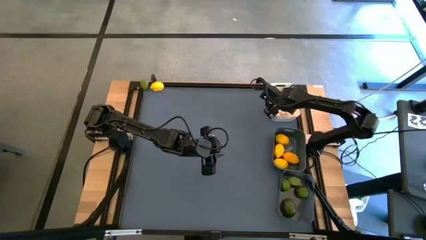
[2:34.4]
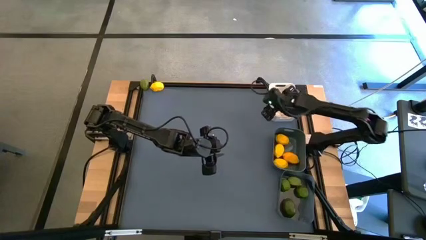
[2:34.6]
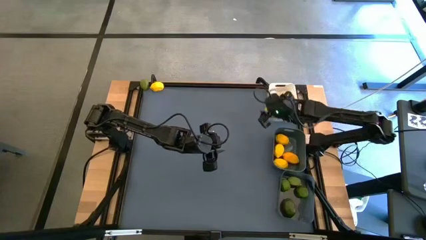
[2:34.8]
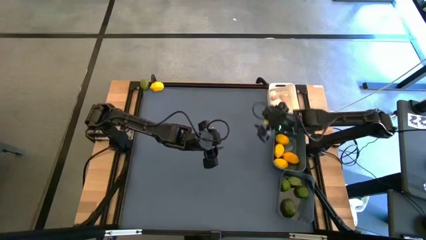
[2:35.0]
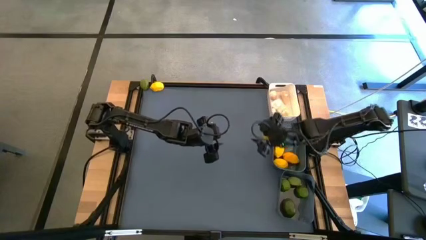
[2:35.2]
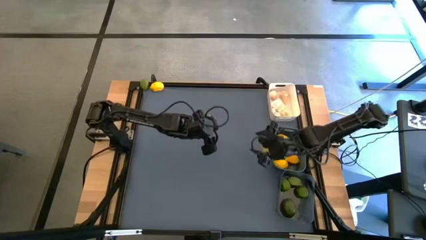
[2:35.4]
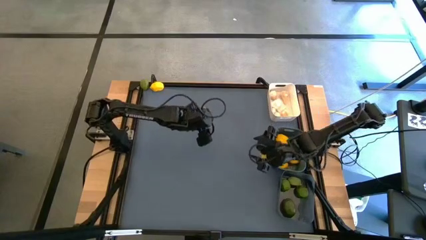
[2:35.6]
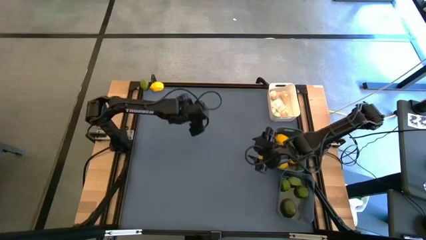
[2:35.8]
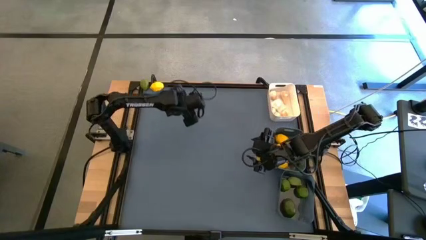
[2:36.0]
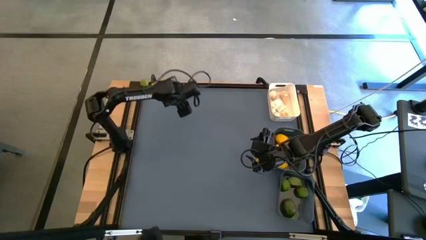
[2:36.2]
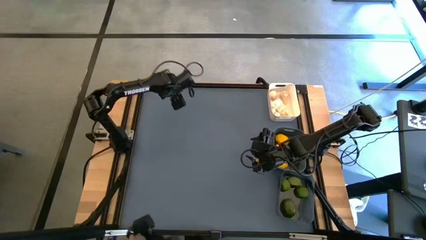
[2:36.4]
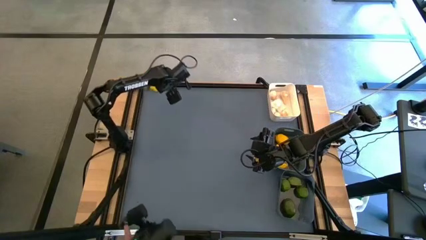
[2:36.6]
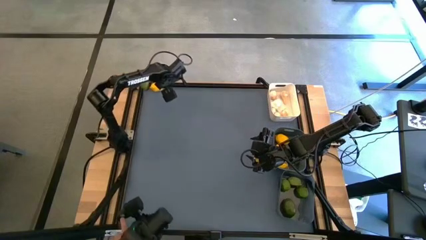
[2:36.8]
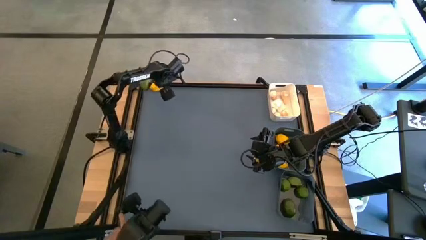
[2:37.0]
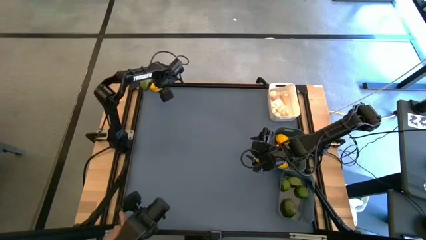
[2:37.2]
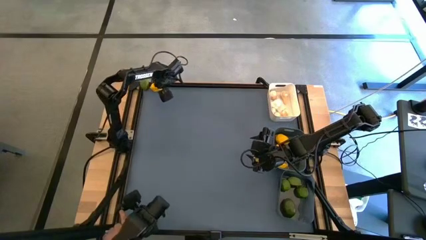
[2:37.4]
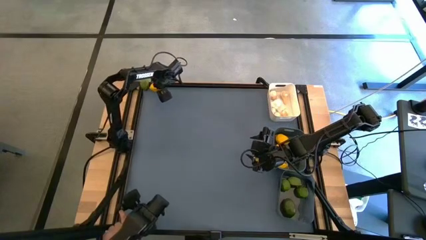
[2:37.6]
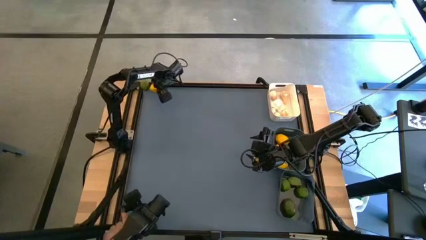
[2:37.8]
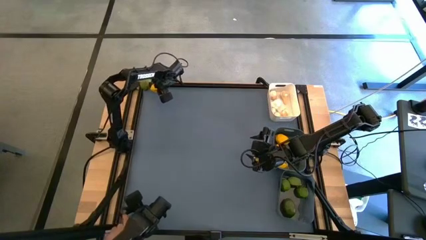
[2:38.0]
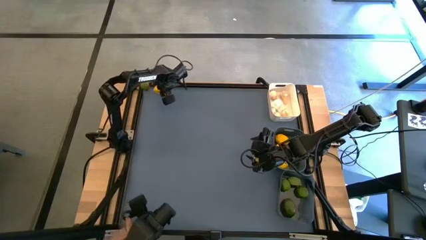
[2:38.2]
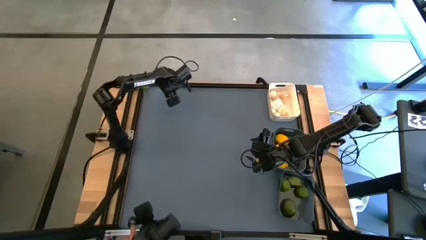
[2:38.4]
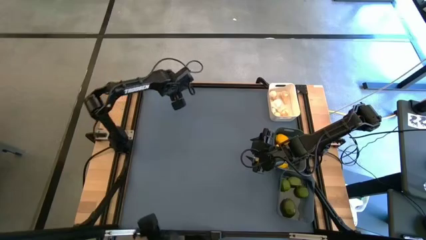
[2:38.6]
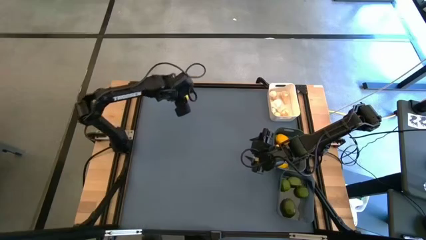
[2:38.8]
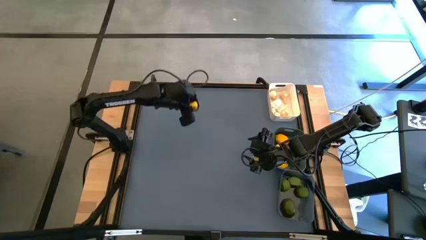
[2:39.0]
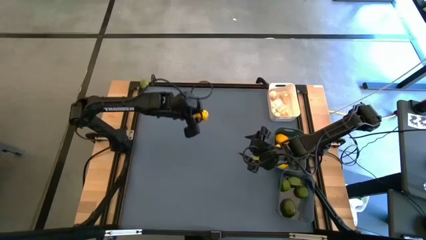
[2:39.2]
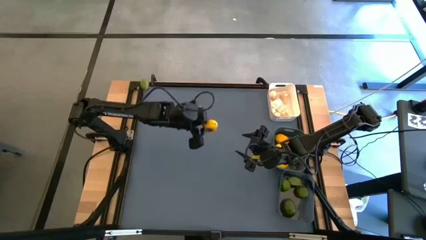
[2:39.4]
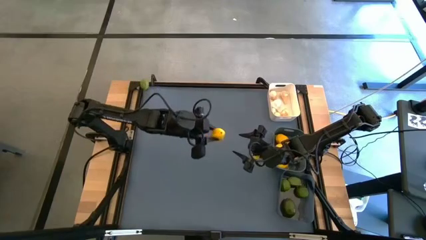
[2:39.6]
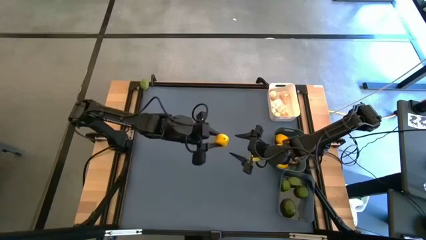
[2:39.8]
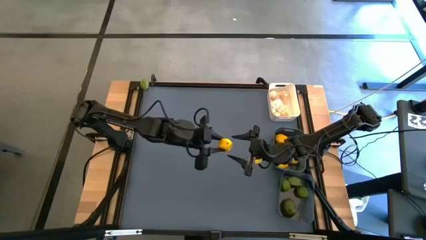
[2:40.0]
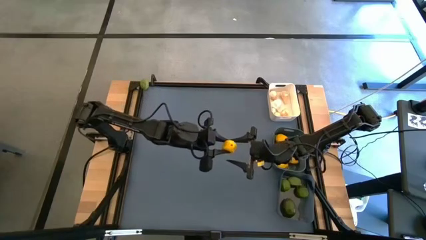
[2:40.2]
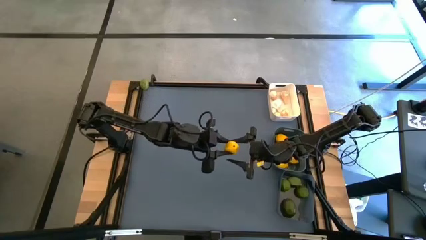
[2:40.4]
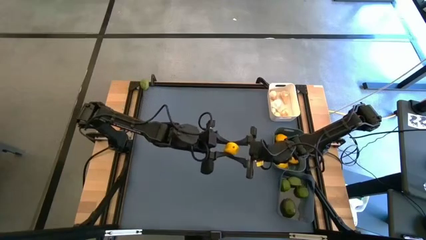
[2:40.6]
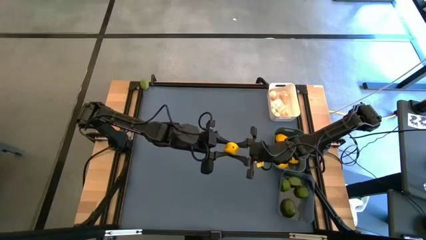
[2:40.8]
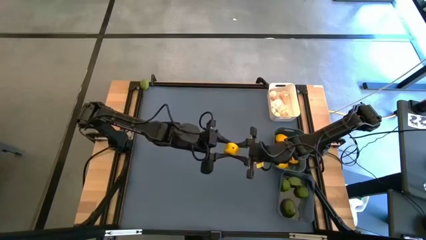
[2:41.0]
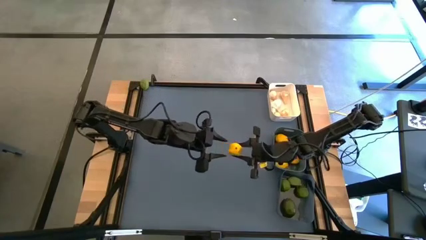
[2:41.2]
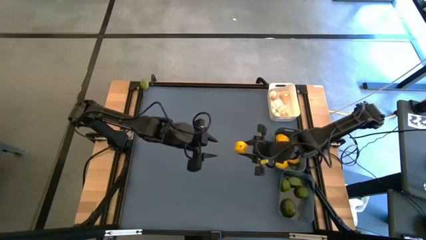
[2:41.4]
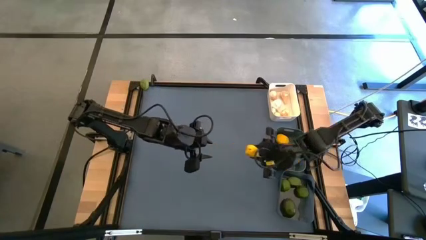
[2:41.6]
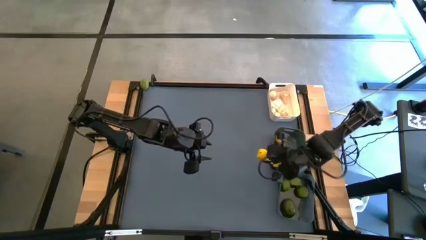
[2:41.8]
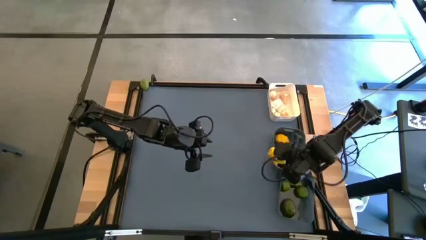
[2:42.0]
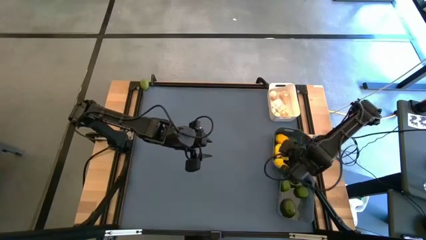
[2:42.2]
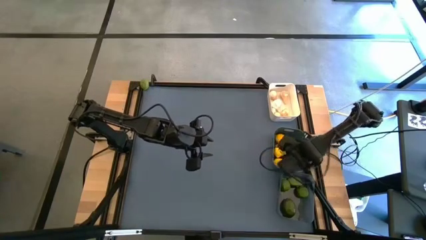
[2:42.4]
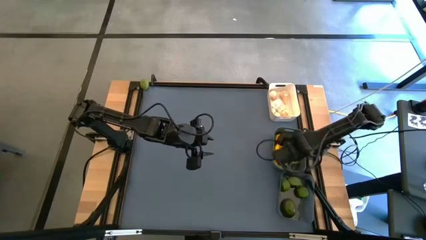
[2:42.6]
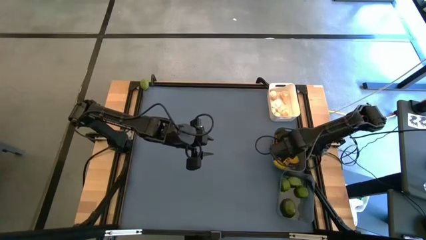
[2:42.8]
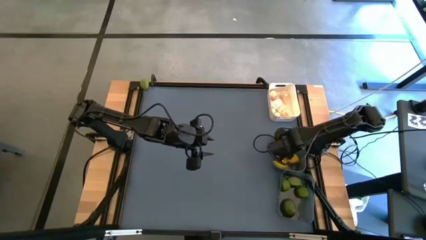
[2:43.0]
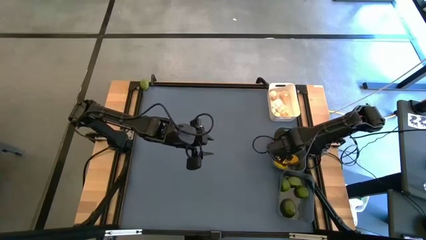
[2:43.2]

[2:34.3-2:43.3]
Task: Sort produce into baskets
Put the yellow lemon into the gray bin

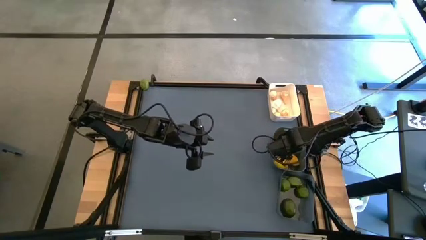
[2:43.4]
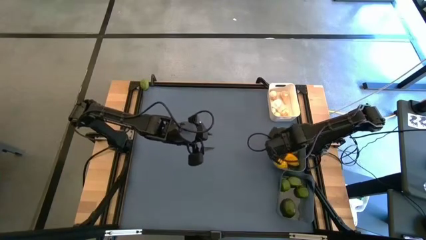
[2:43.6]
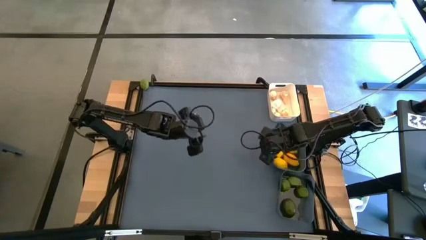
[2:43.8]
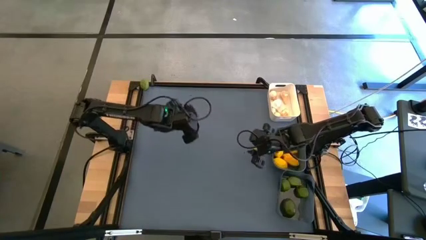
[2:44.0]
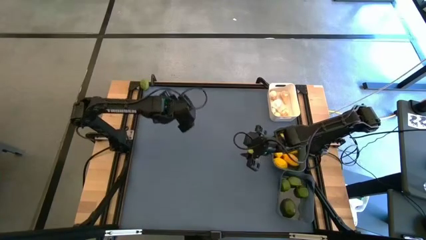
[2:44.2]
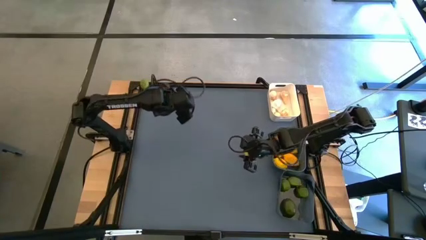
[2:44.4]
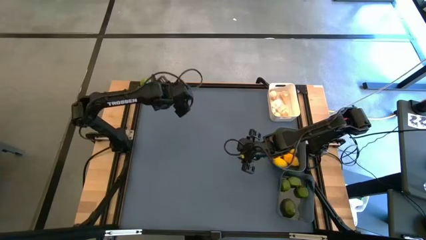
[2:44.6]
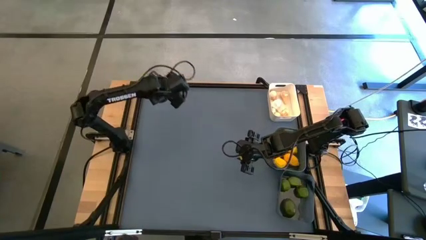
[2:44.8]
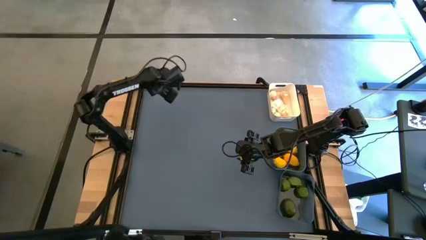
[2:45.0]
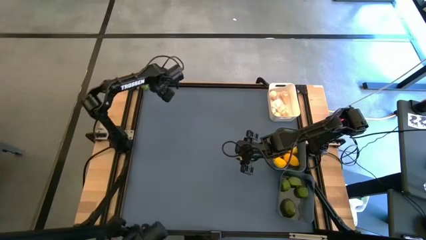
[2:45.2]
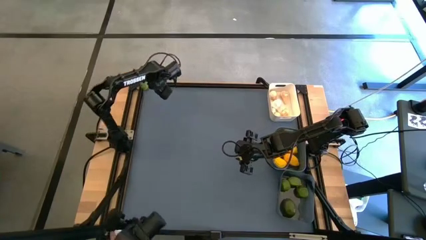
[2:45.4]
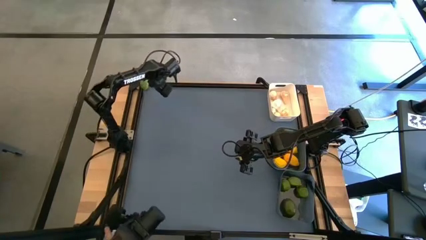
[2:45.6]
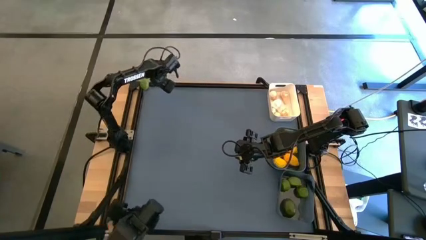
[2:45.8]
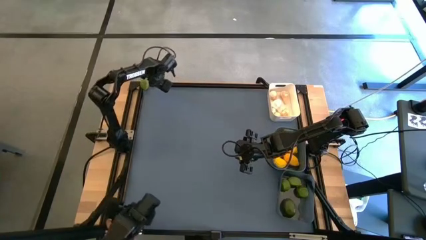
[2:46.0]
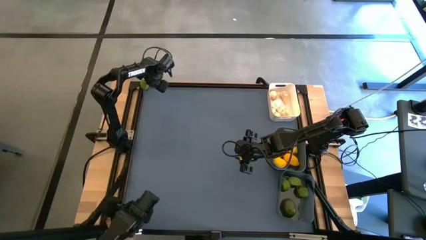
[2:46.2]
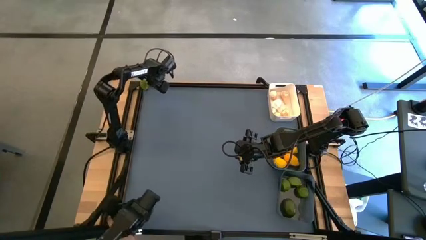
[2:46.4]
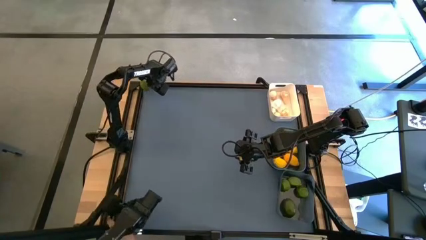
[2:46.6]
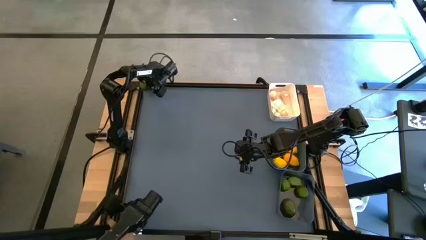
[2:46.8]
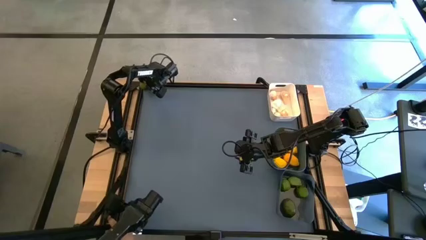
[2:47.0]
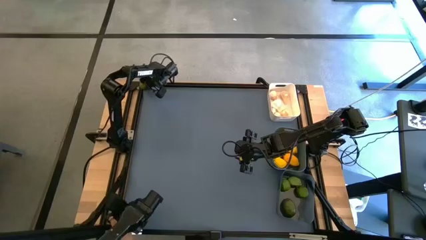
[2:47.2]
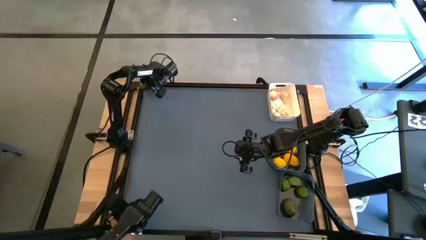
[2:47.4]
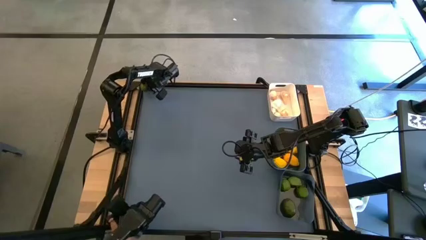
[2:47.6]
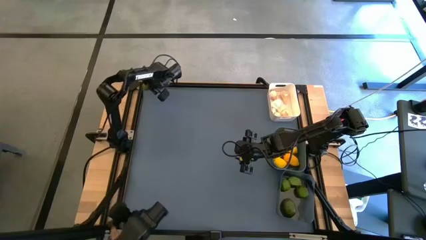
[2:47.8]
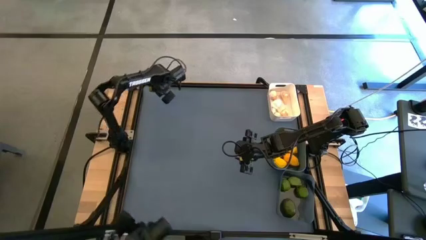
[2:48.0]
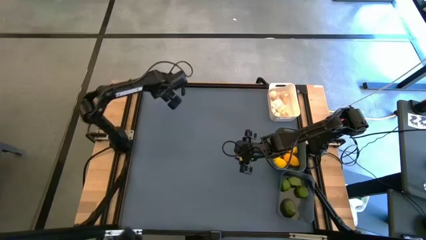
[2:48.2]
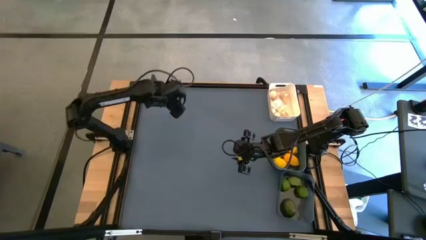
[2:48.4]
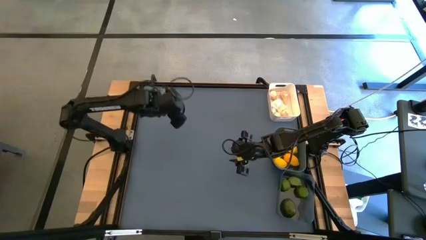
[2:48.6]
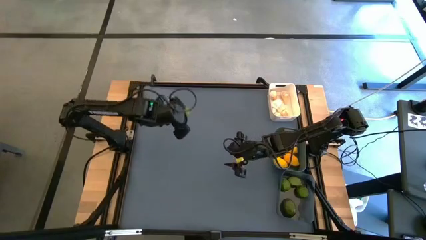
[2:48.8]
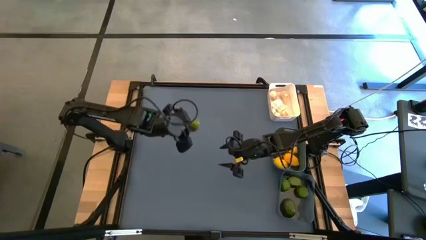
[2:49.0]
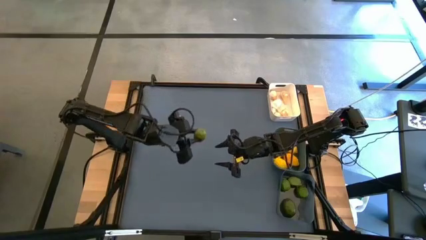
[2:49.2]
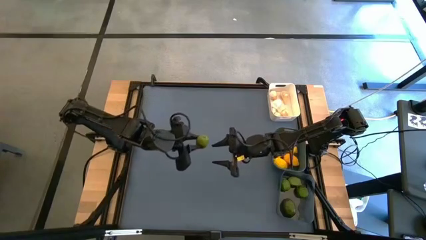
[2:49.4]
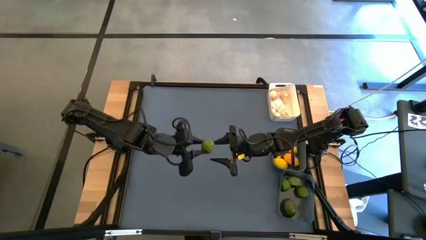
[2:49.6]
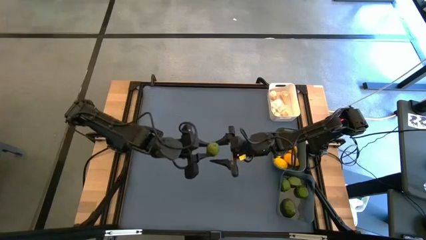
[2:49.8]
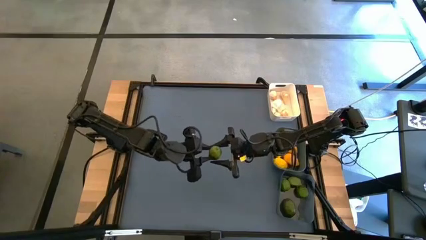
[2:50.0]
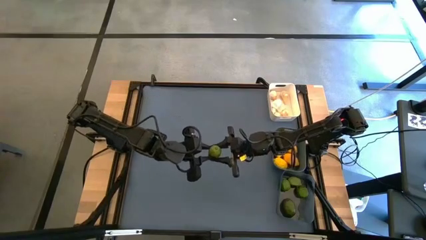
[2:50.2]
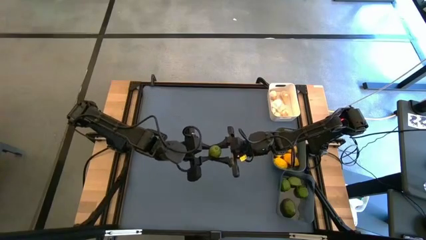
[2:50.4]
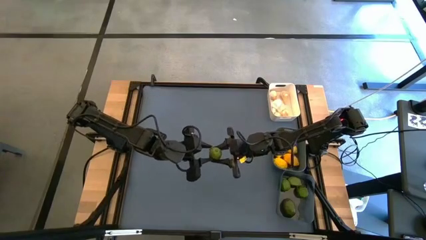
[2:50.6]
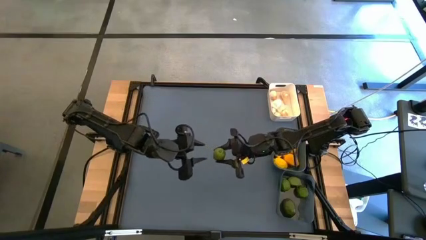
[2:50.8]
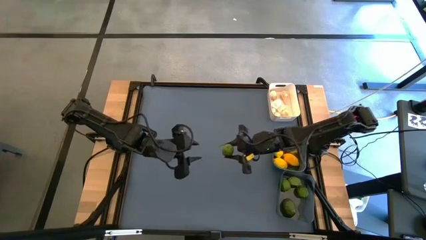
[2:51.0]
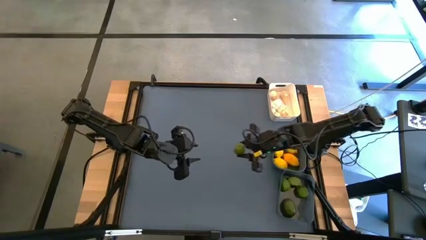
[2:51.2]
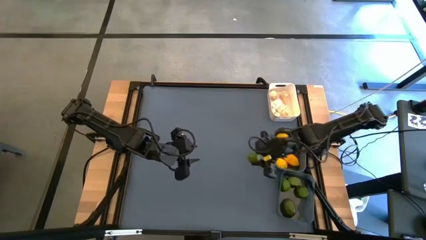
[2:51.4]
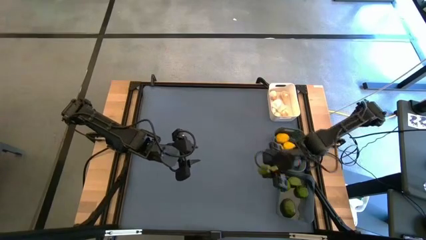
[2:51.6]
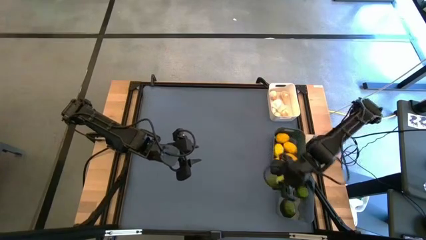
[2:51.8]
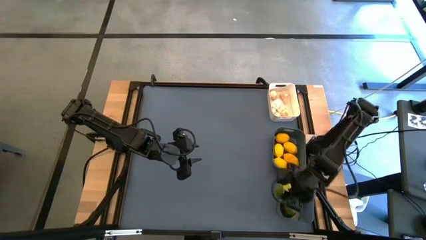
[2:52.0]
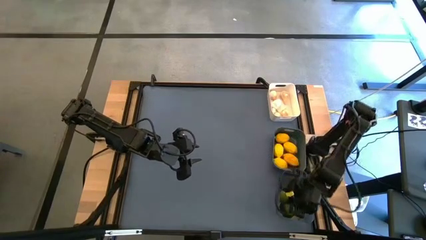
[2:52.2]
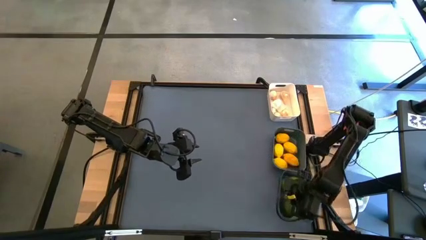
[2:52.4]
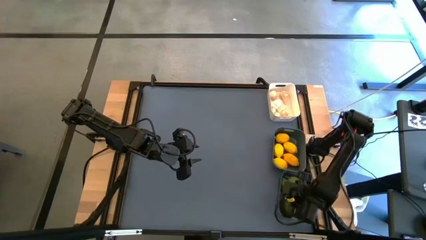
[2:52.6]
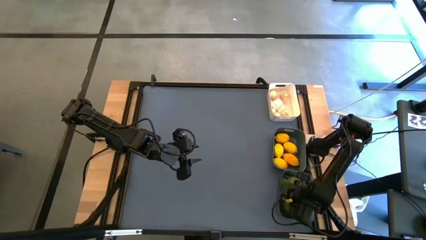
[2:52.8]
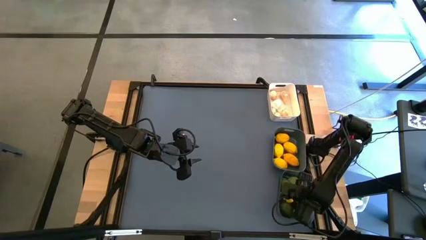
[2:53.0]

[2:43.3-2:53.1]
Put the green lime into the black bin
